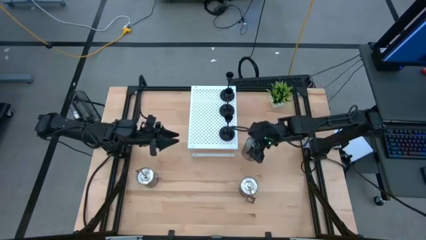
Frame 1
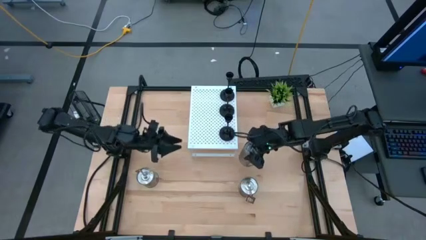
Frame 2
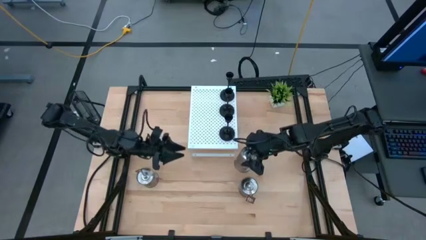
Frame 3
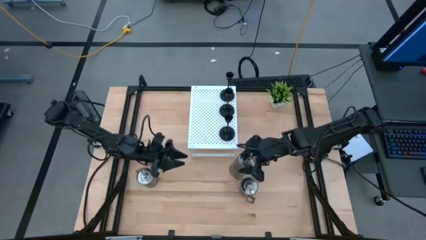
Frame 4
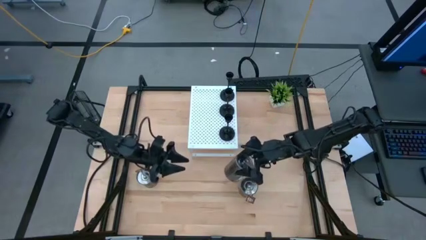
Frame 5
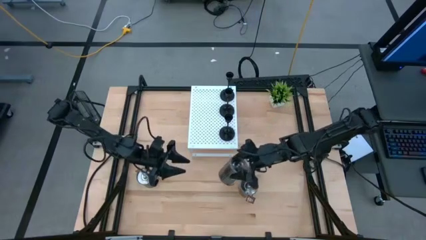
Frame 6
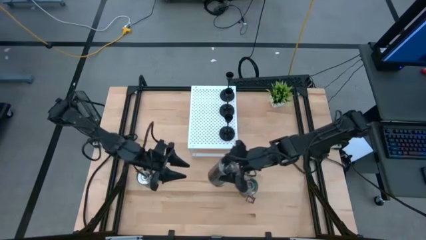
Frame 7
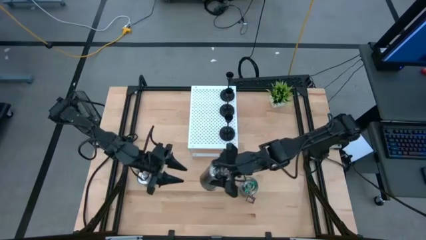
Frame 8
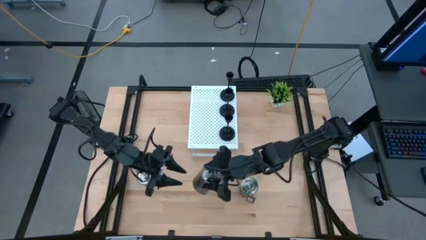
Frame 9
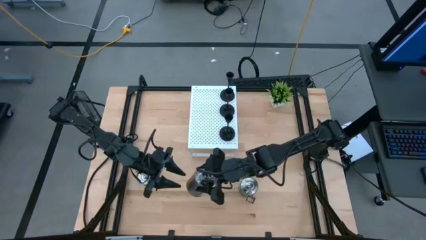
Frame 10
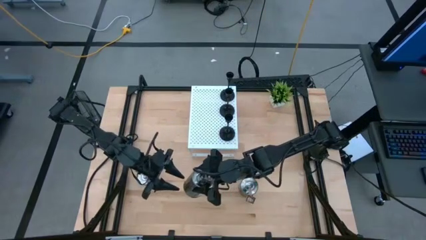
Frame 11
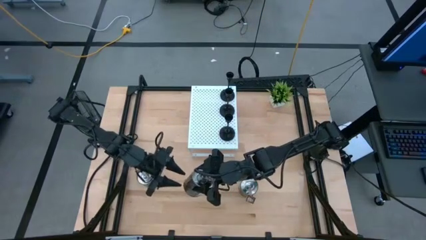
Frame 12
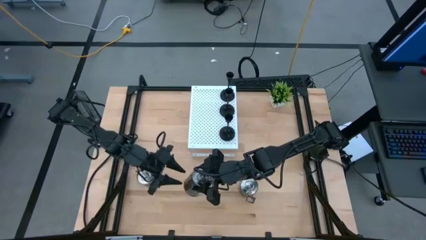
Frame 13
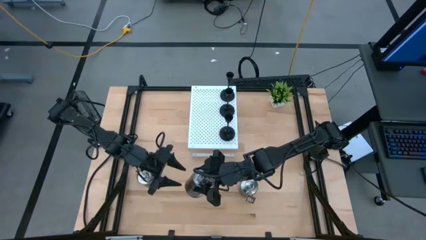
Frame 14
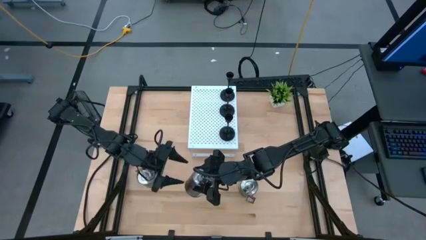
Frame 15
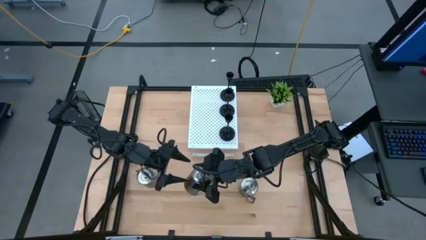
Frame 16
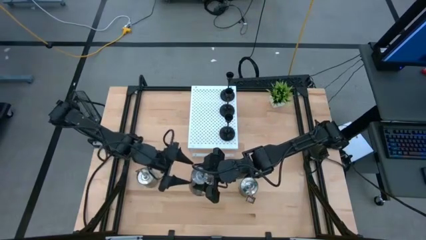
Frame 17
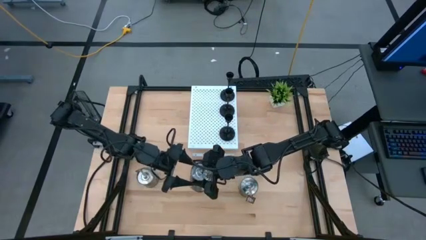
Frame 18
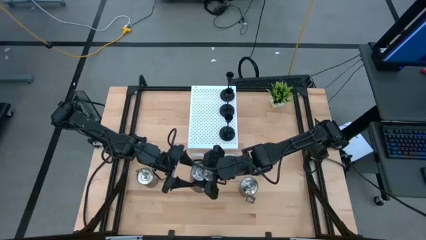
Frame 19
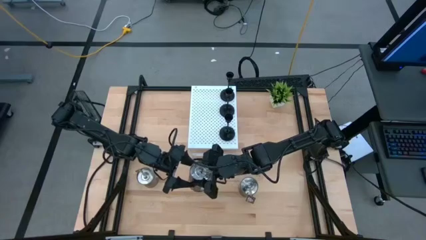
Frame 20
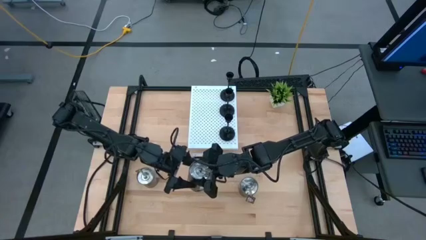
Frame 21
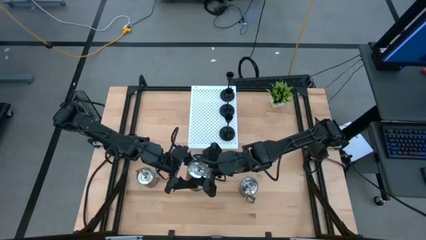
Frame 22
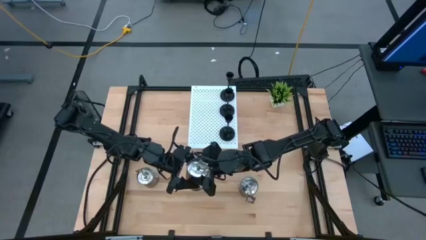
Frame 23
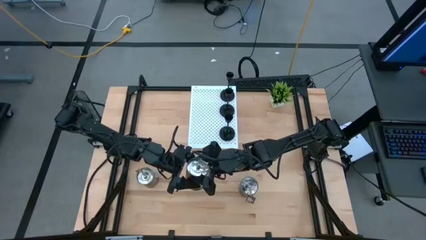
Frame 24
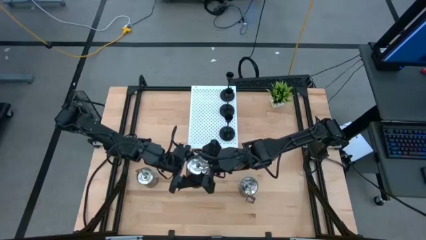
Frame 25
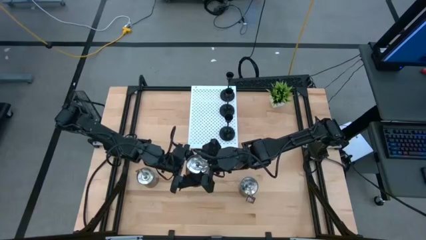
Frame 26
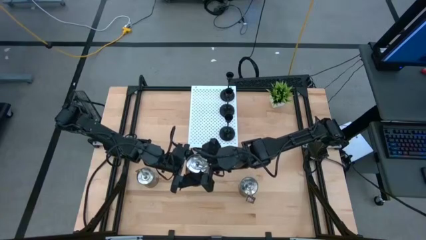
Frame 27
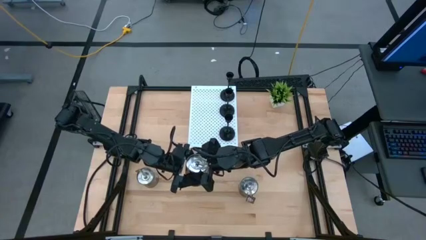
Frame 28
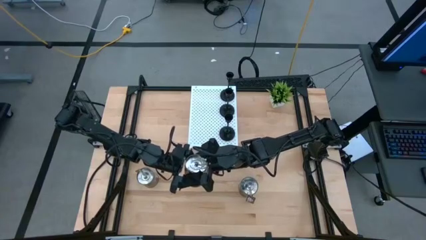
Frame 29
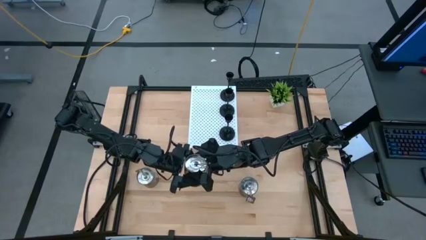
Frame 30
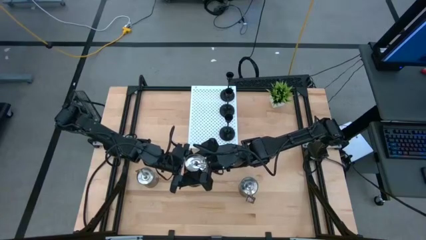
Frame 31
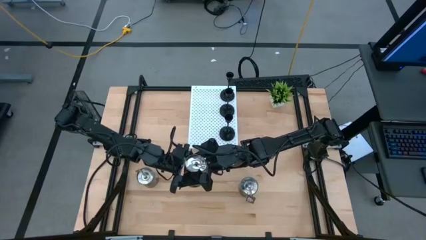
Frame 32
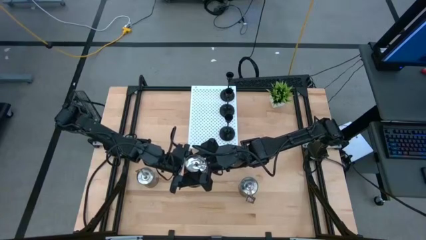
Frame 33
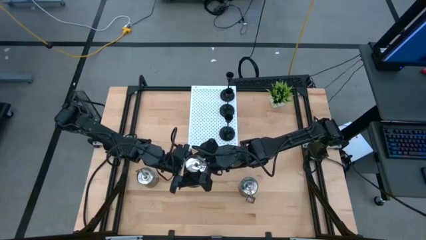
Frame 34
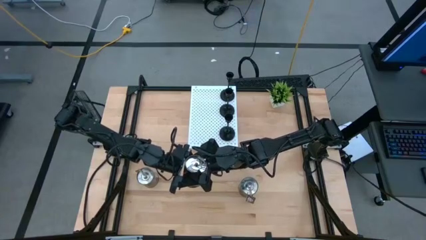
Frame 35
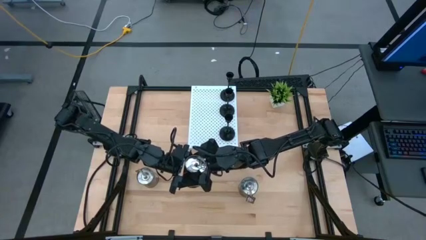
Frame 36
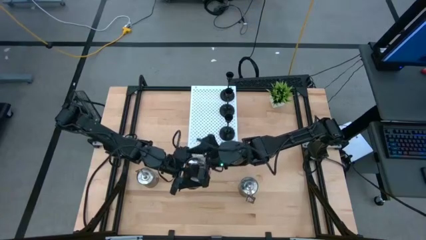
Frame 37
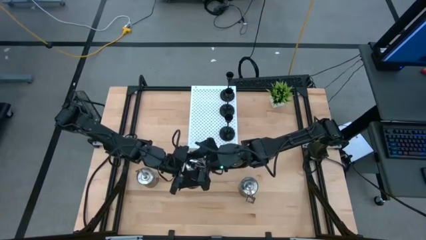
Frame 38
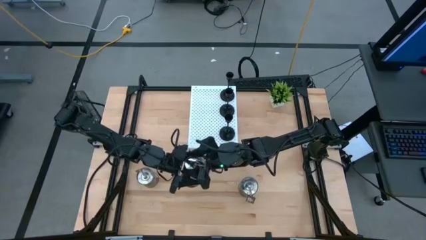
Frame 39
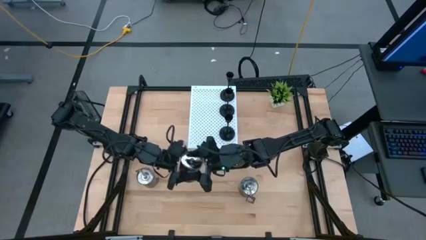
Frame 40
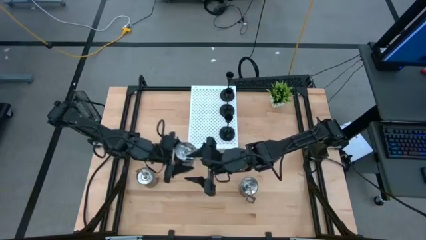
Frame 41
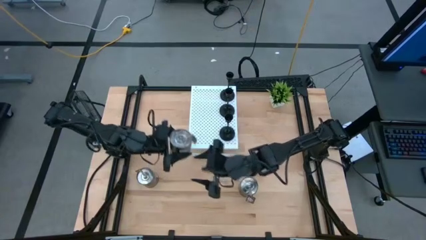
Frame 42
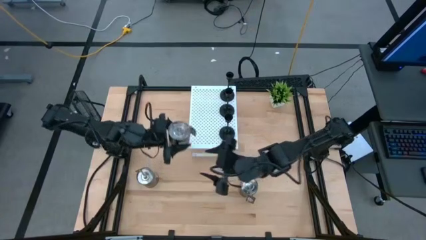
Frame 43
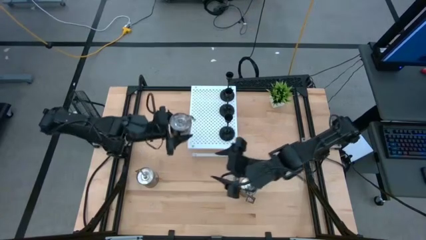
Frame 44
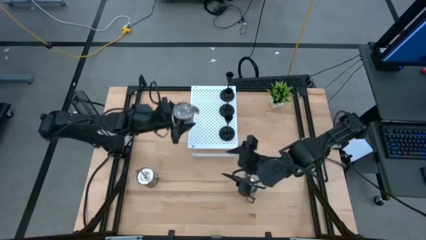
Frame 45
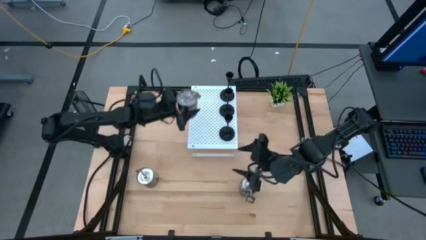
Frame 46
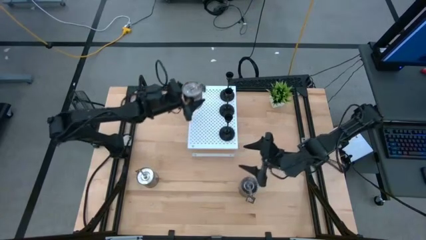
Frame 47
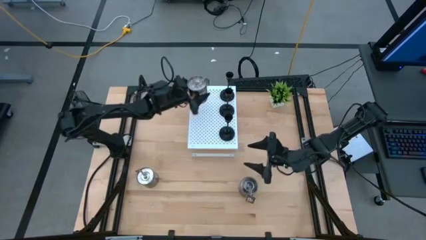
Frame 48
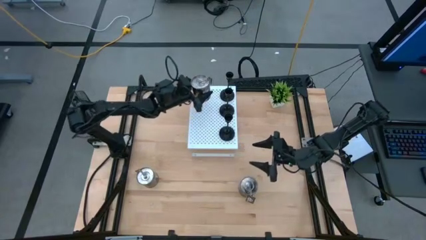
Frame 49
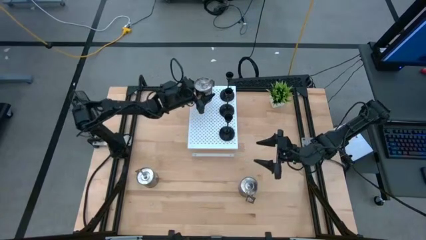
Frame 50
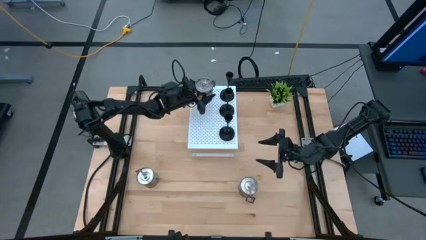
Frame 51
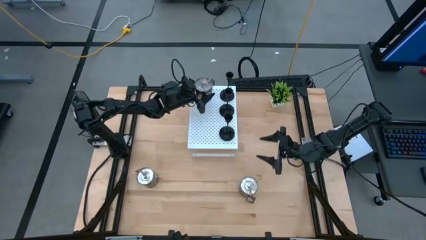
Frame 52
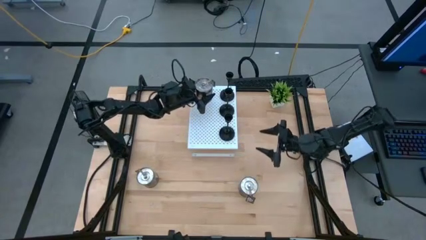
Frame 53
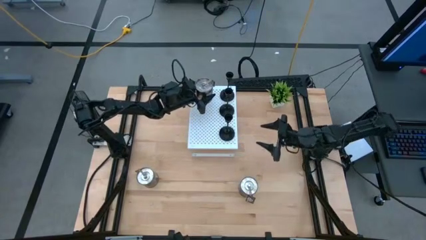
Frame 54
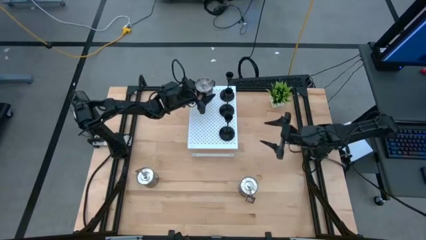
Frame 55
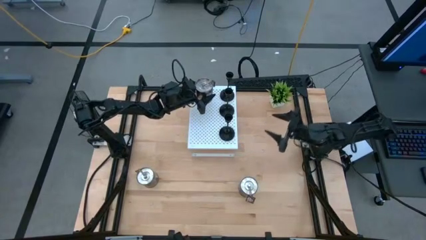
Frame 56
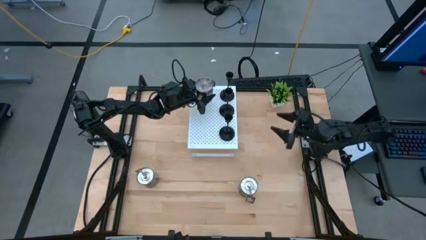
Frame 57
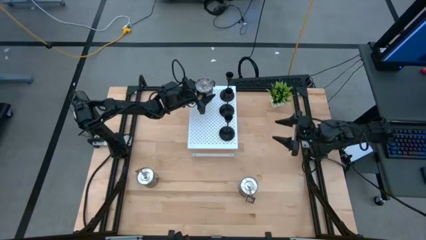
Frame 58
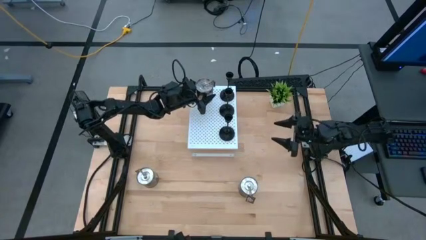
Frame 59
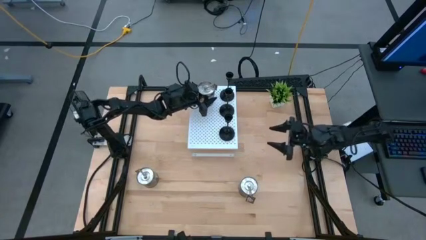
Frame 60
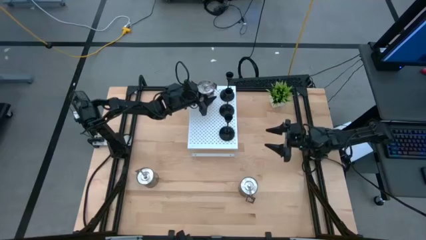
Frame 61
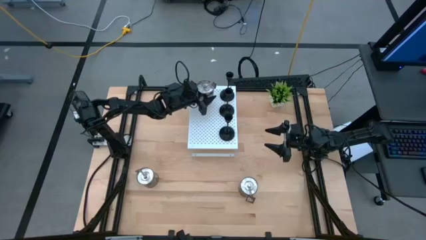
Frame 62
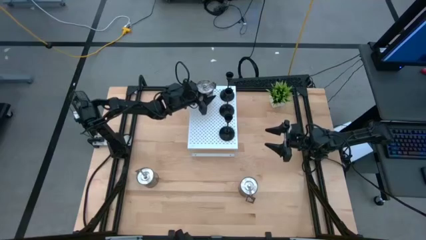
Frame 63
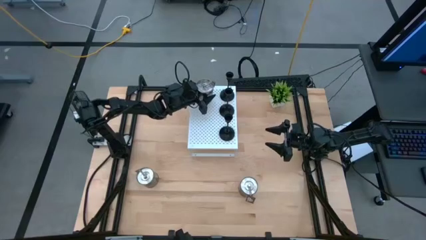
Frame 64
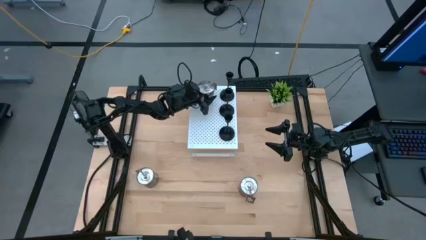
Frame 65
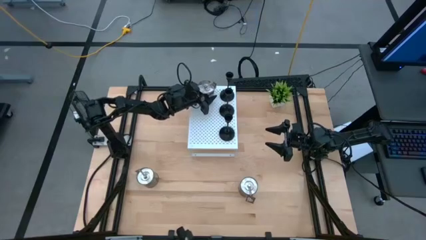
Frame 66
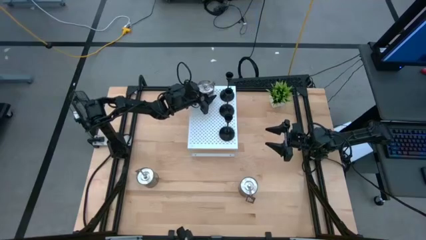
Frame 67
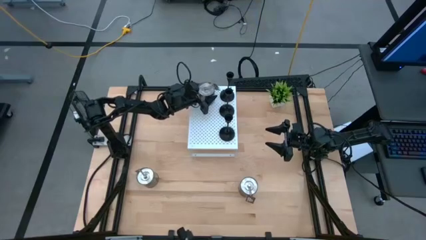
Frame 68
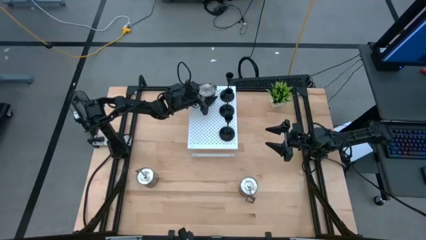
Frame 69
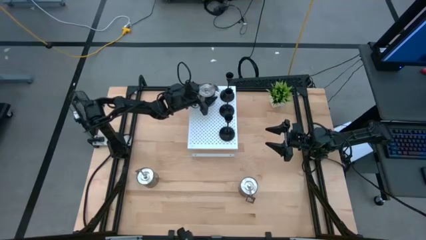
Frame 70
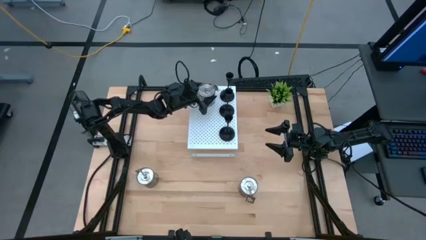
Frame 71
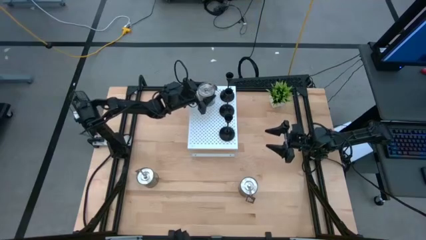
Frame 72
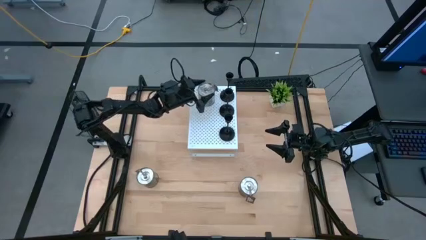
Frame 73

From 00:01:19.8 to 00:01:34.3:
Task: Pick & Place candle stick holders
Put the top right silver scented candle on the shelf

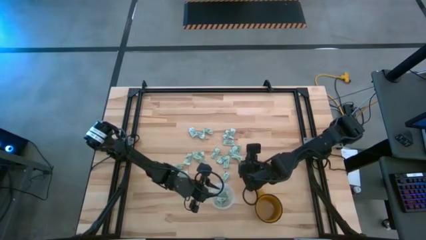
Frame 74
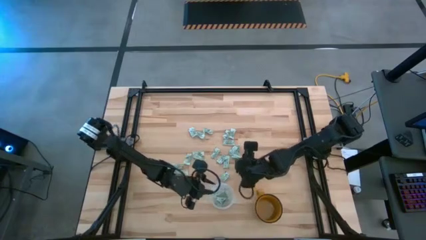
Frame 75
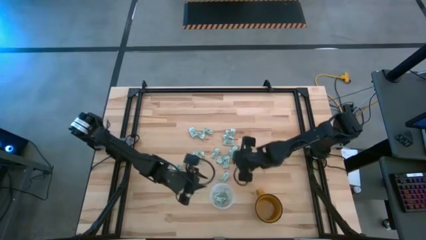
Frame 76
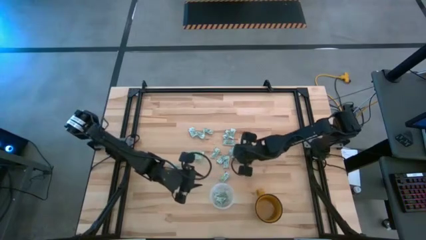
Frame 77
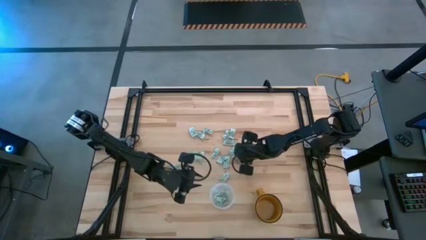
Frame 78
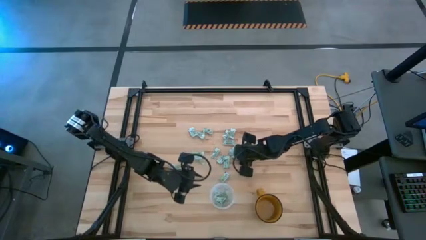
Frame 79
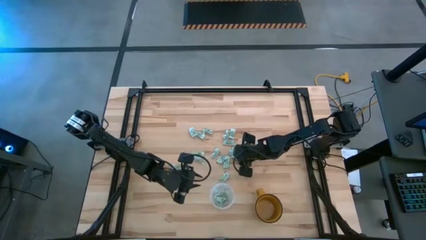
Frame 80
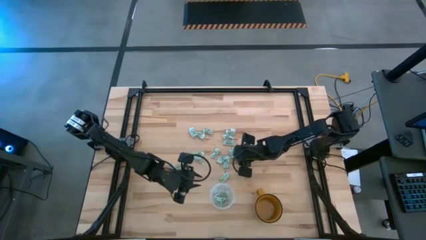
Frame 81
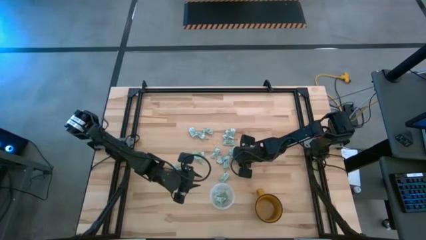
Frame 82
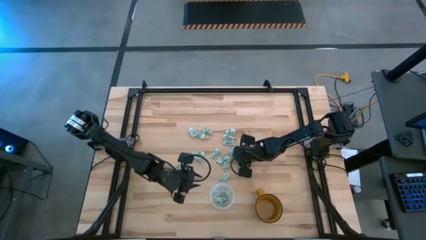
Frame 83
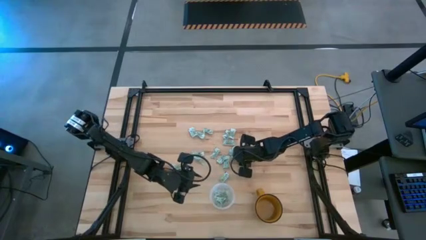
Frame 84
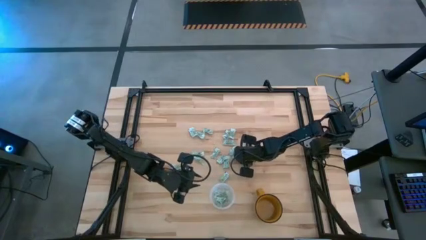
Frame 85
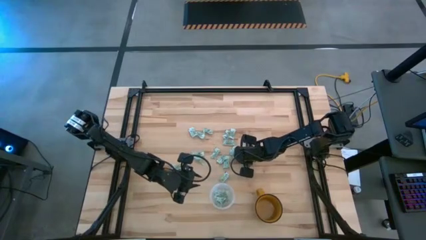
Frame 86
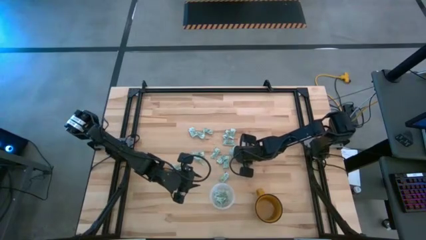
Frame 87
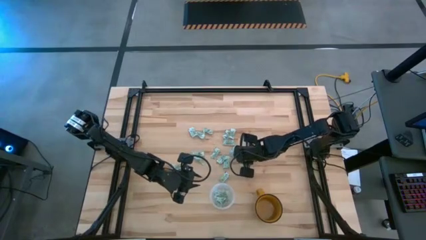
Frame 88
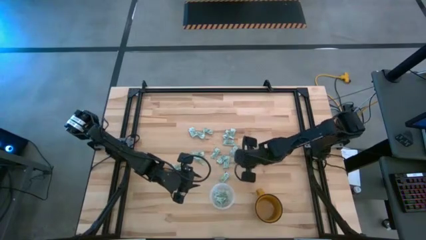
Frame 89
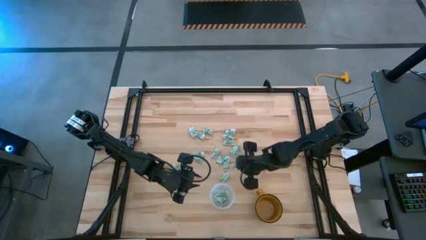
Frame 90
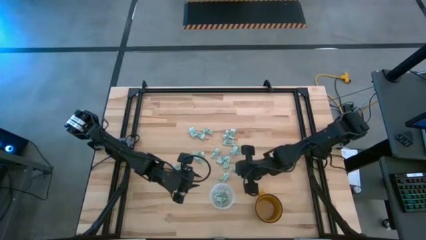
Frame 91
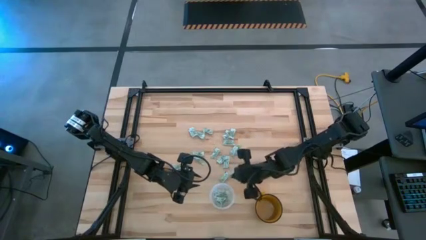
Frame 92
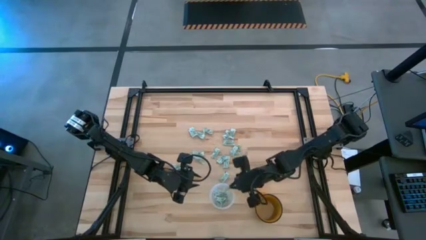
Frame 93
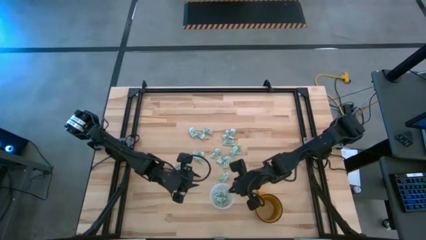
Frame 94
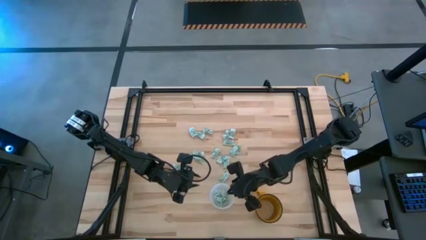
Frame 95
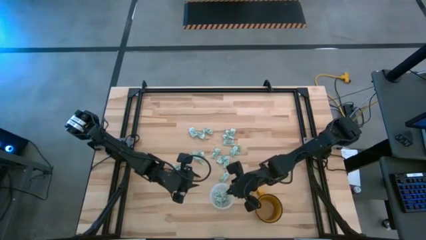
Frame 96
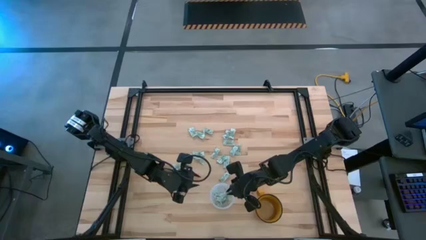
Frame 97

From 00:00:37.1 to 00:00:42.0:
Task: Pick and place Stevia / Truvia into bins
Put the stevia packet into the transparent bin
